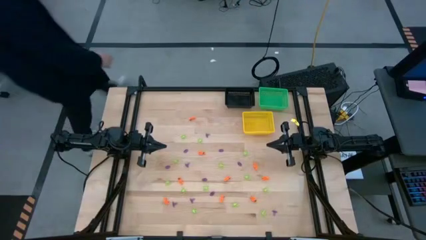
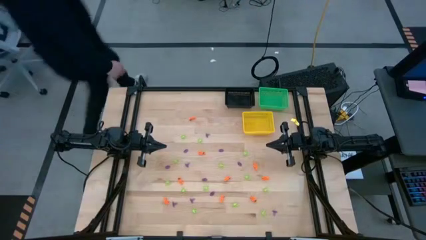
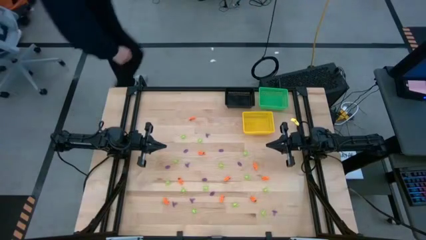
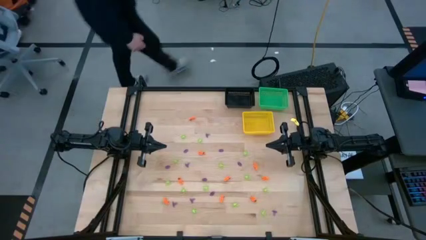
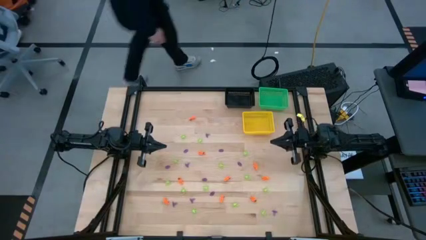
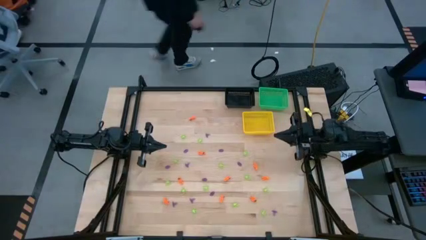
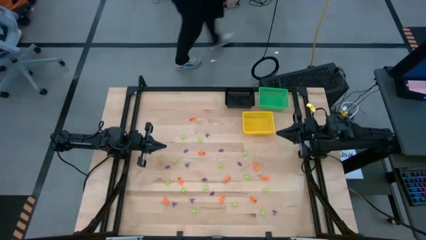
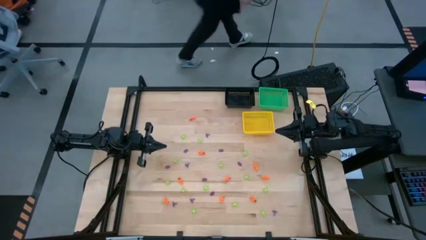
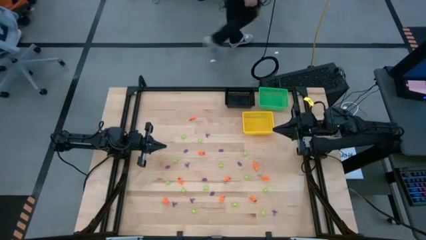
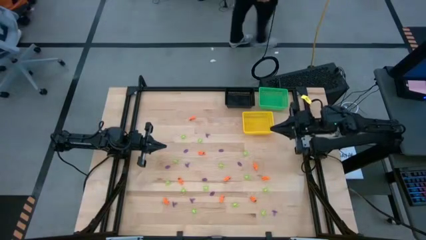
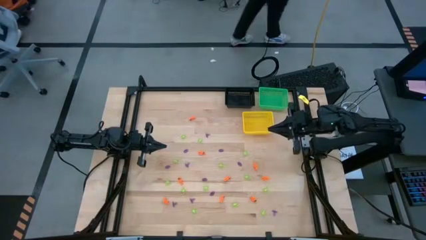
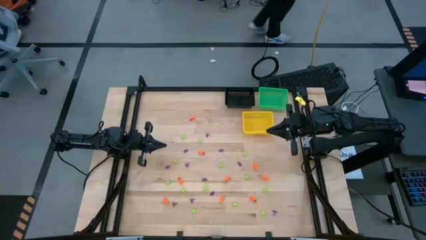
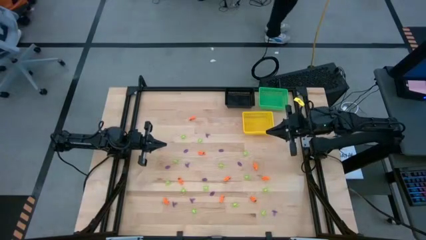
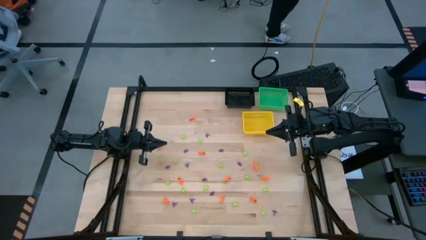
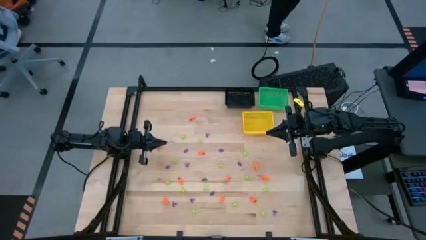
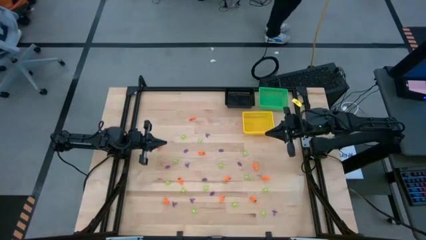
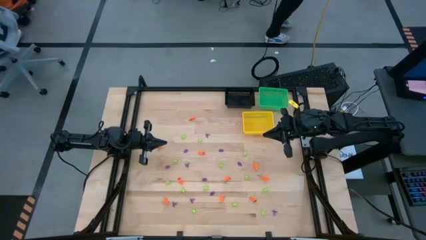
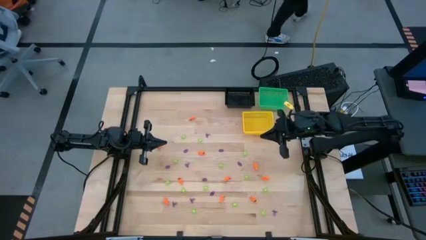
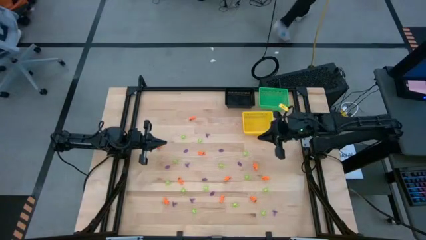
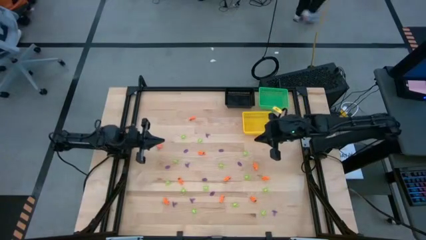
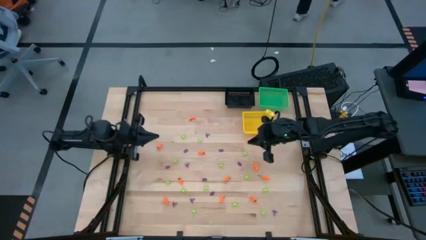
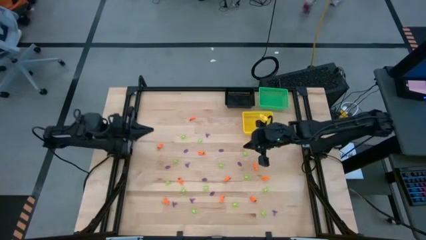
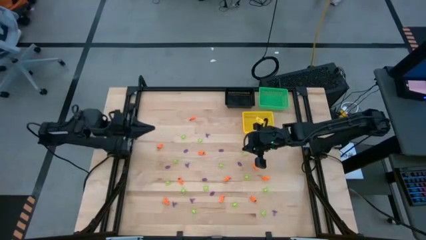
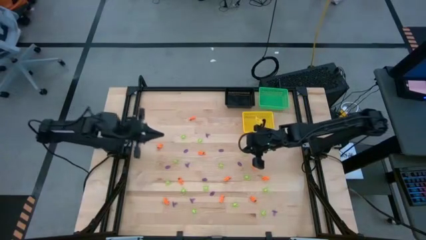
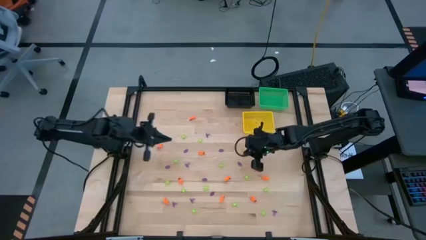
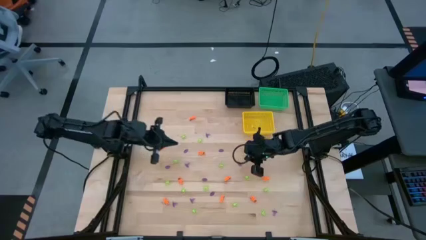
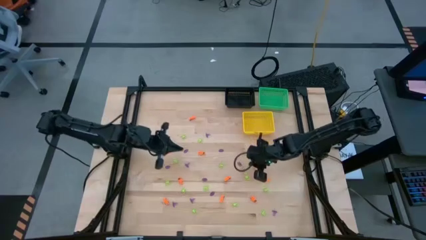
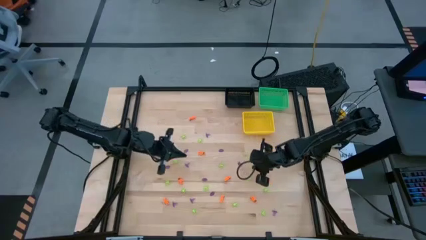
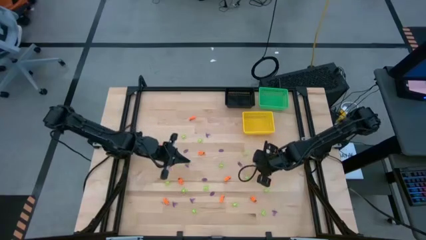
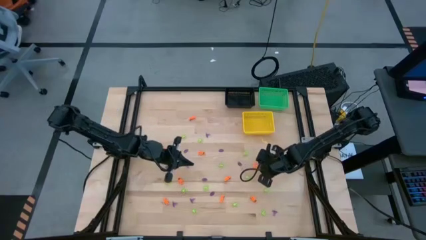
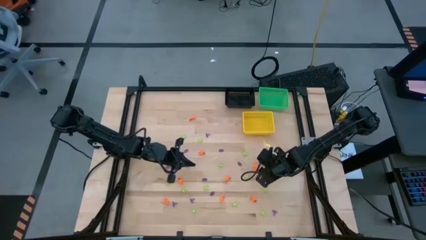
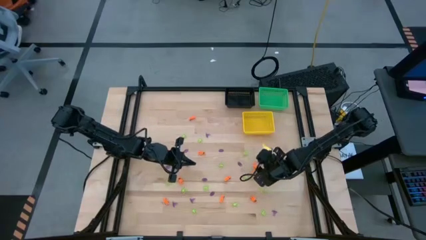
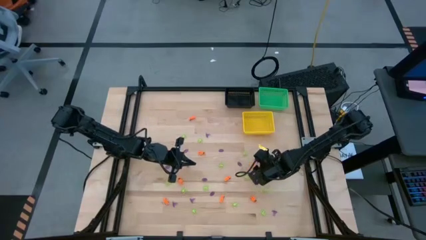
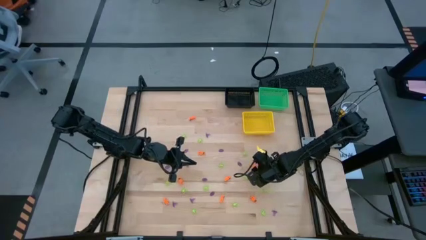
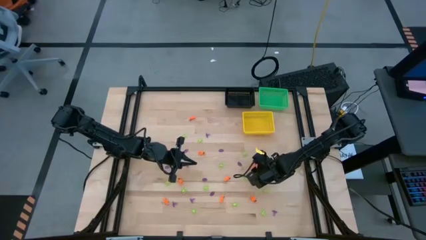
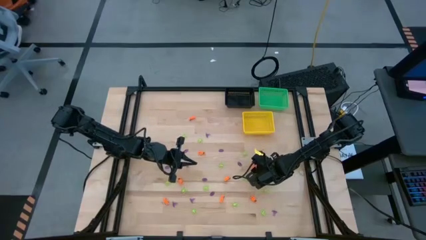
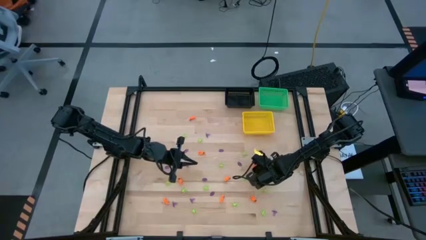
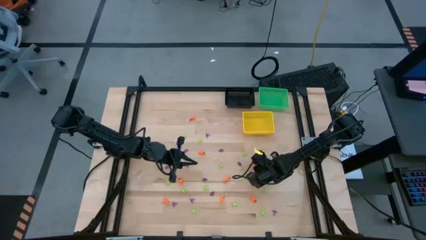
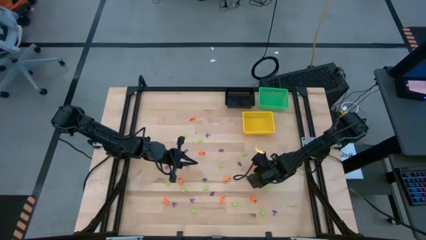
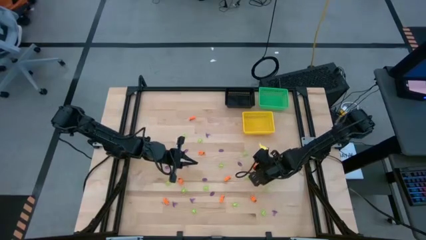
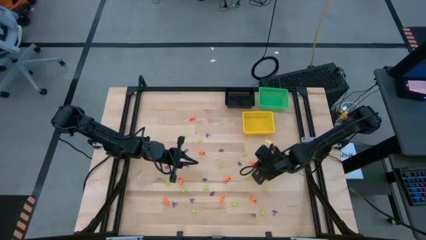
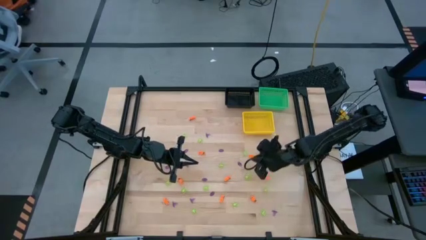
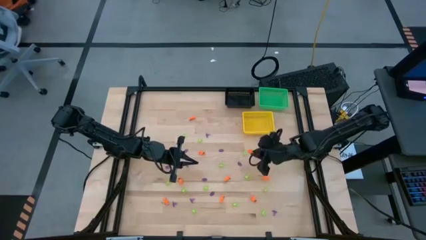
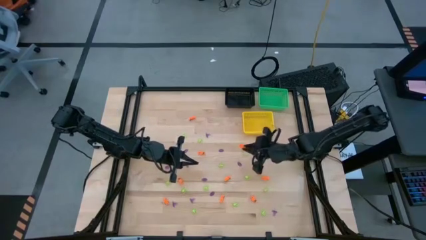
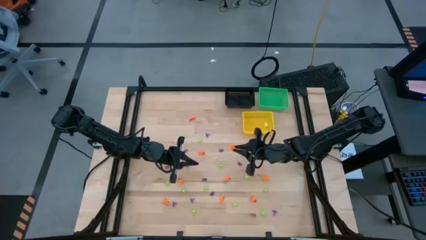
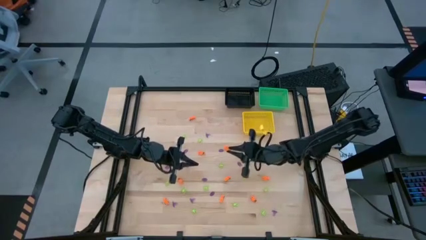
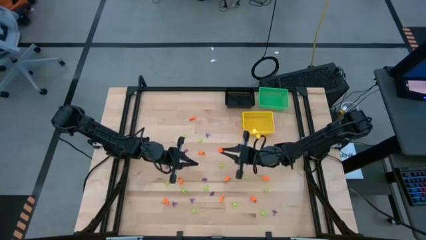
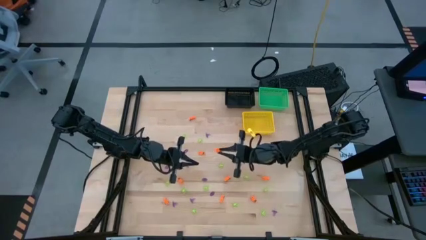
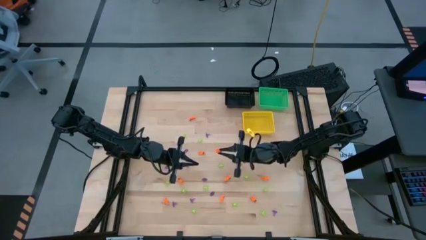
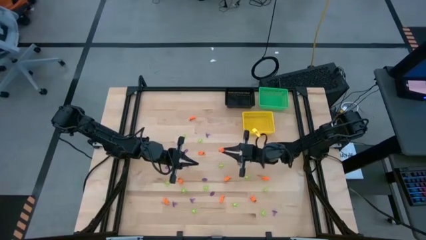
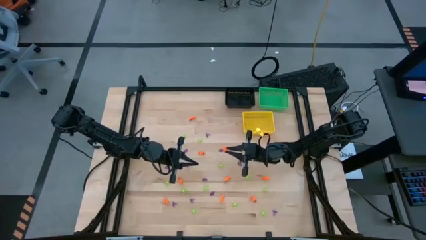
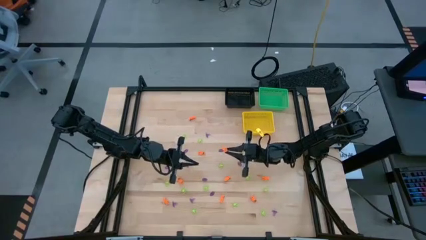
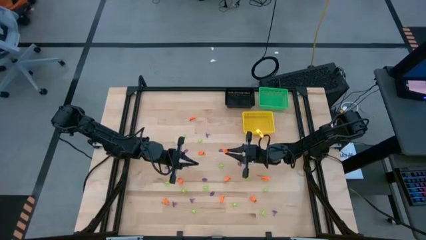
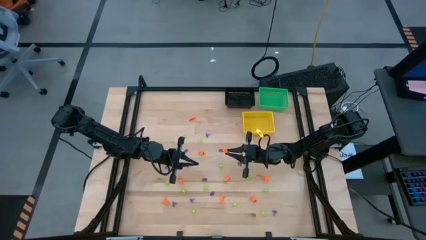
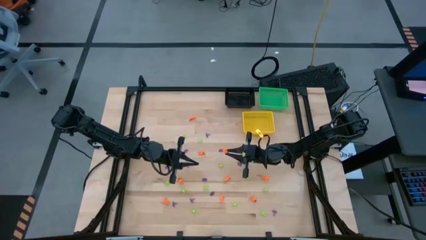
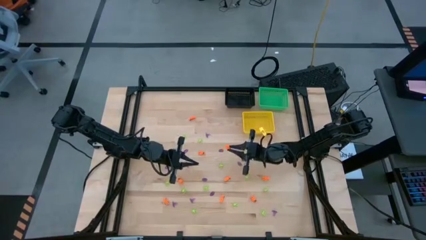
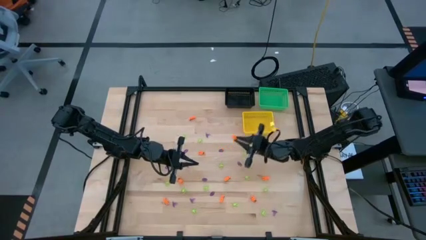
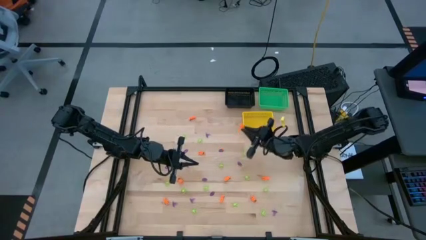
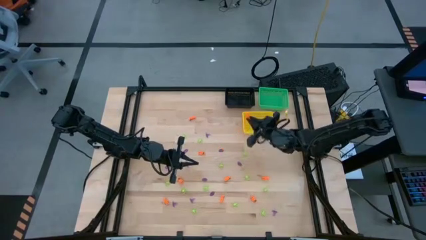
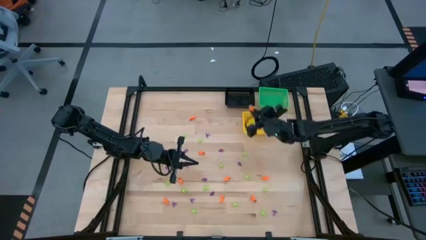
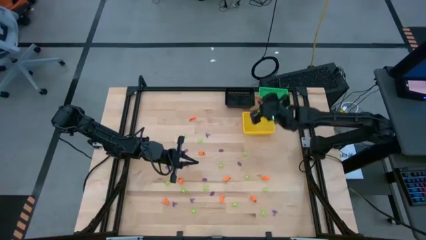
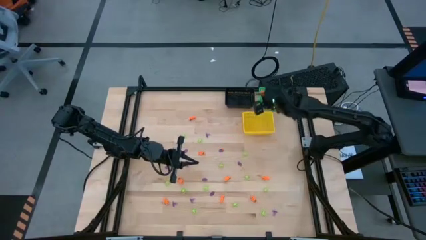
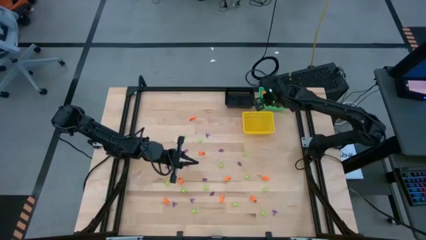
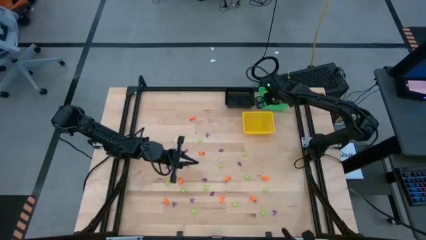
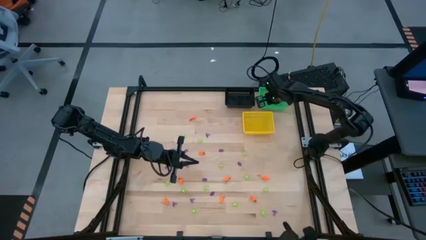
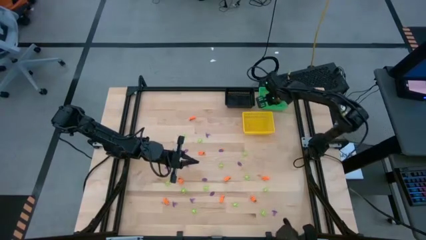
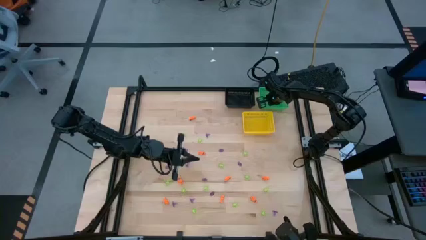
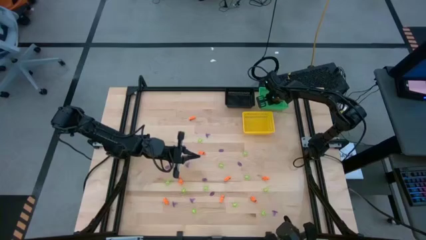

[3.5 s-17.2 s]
Task: Sort Halloween decoration
Put the orange skeleton toy into the green basket
